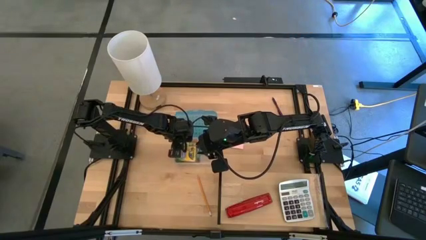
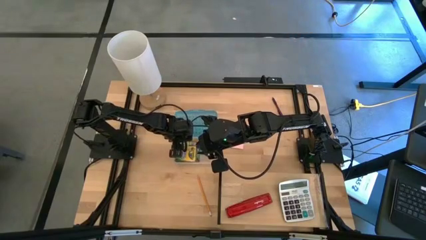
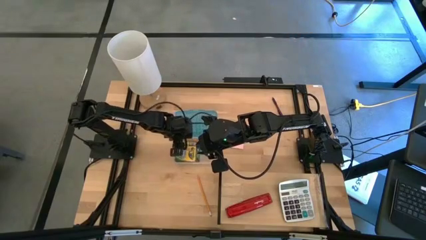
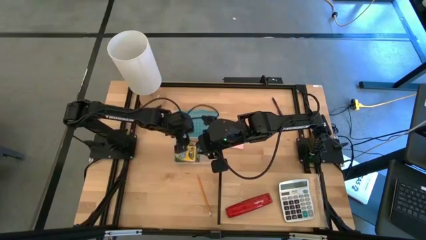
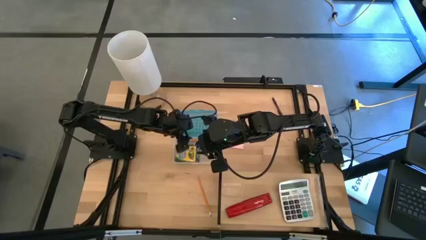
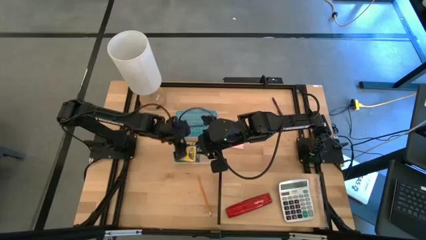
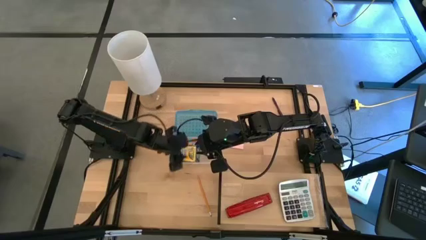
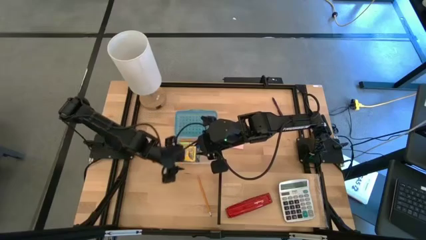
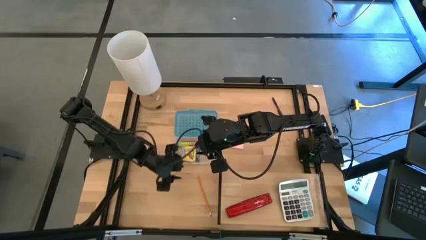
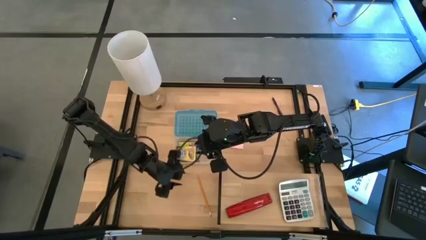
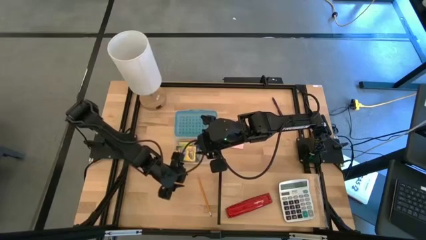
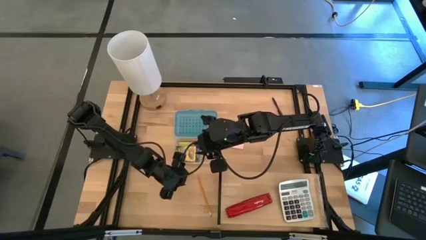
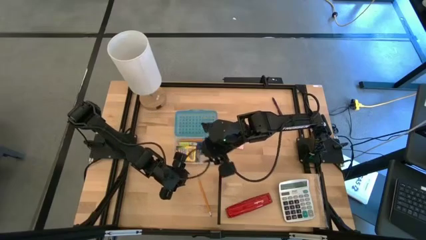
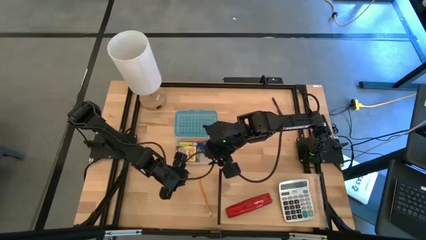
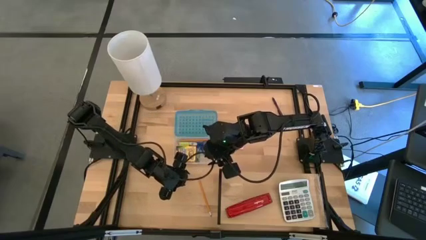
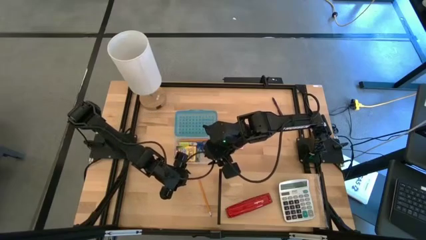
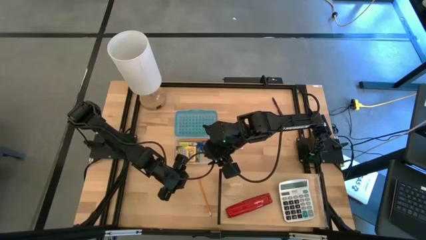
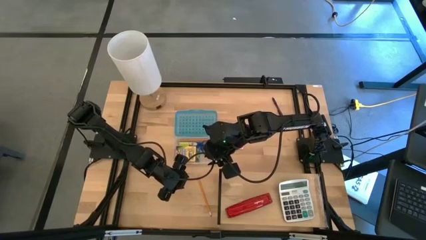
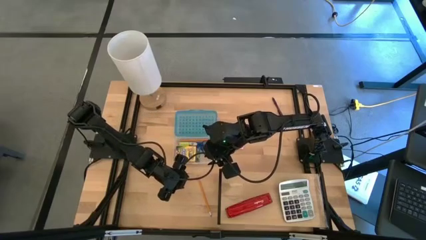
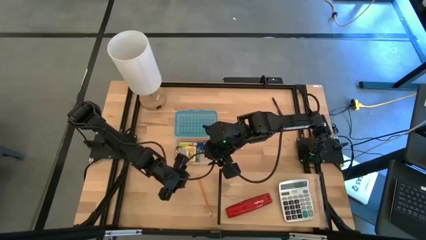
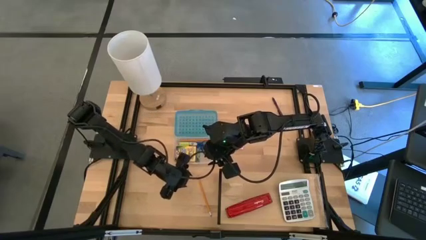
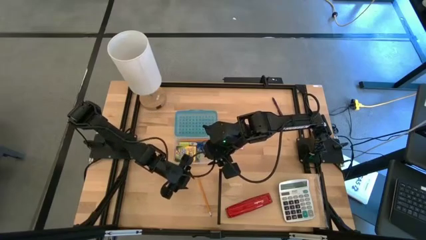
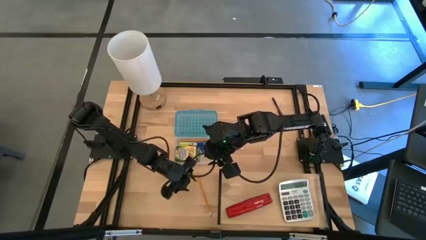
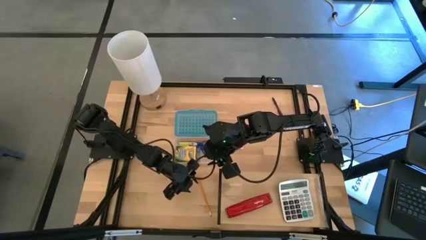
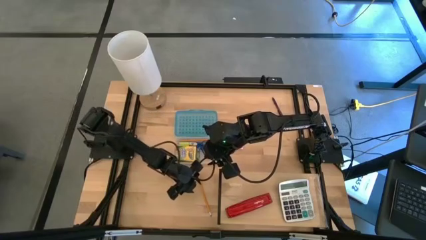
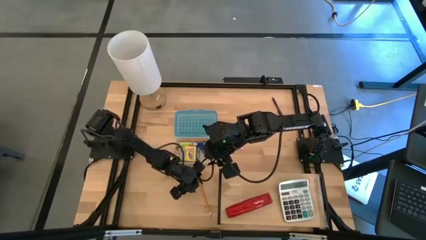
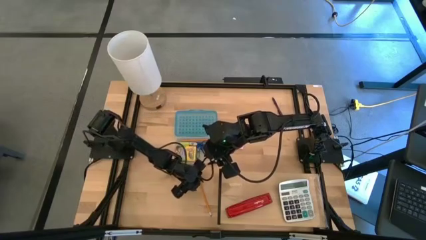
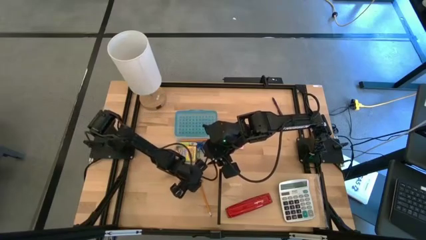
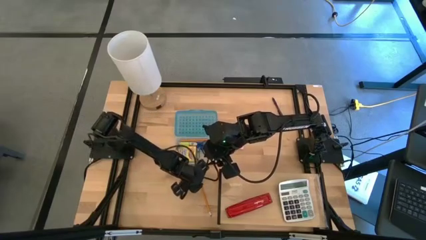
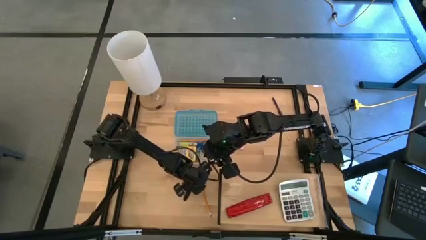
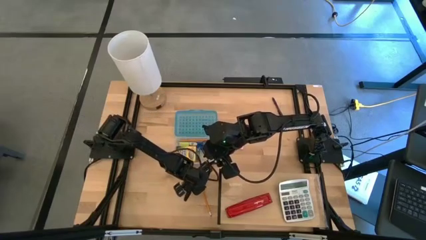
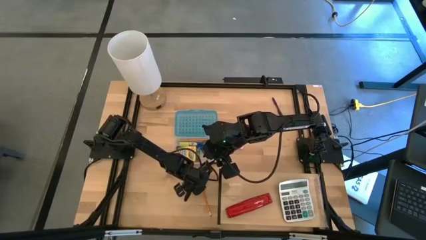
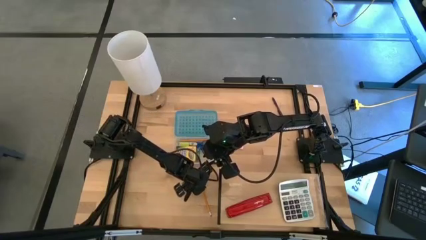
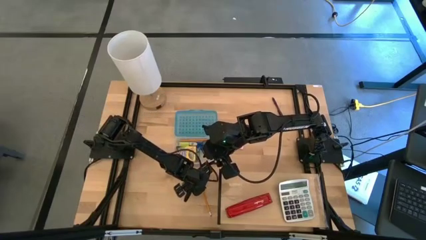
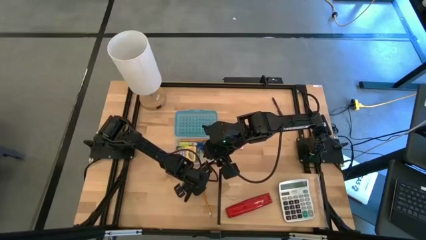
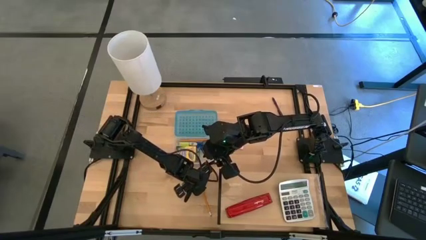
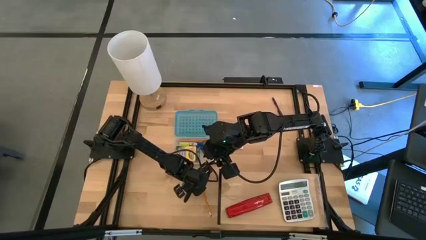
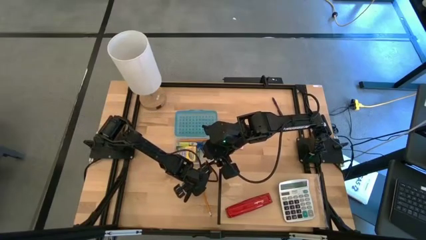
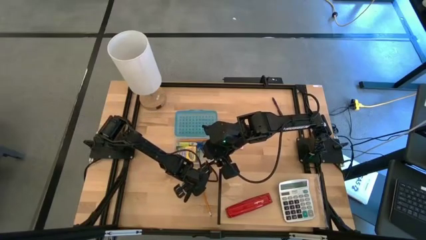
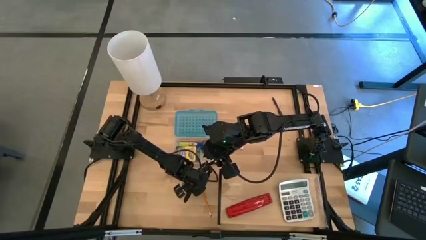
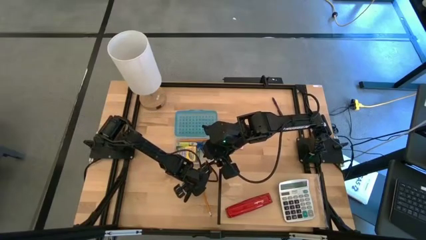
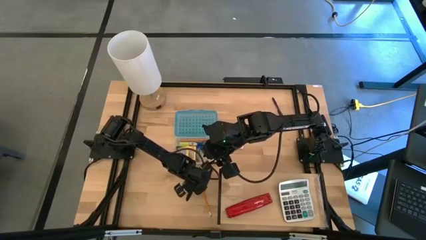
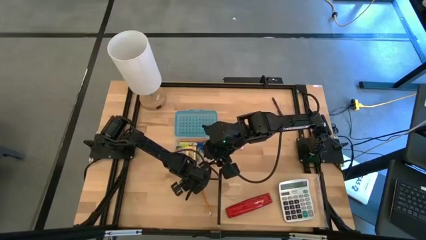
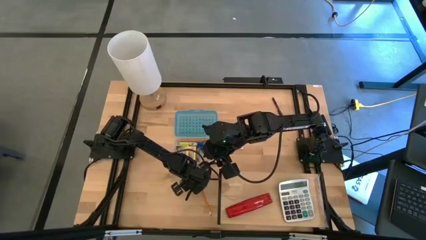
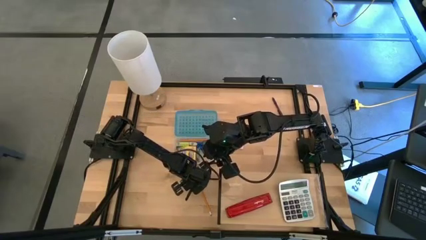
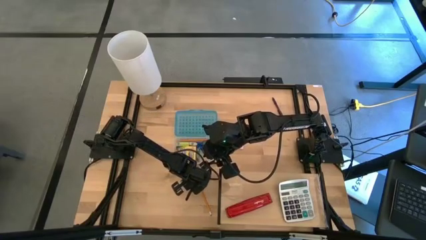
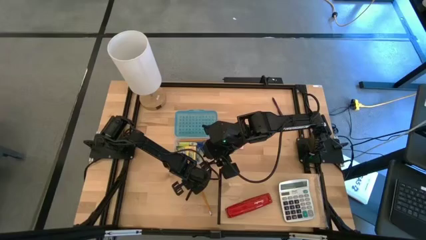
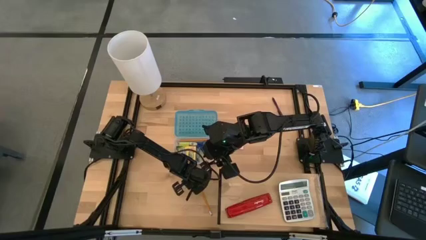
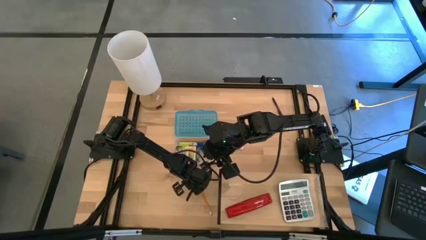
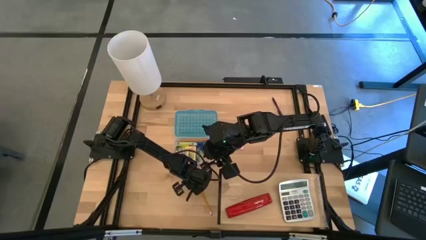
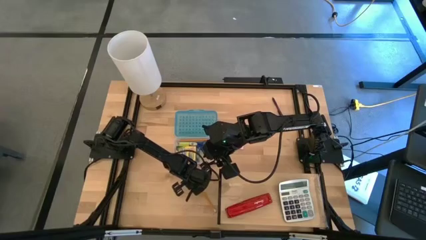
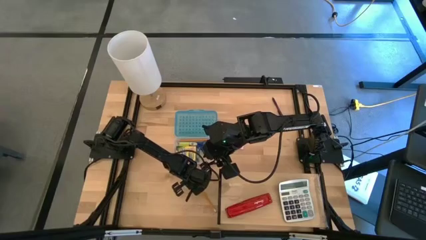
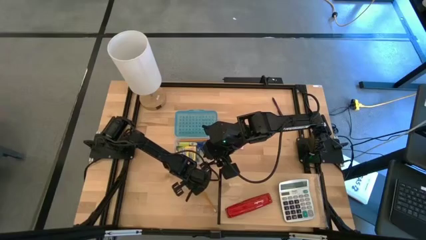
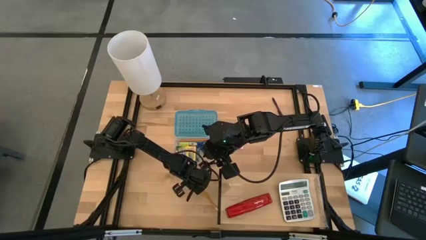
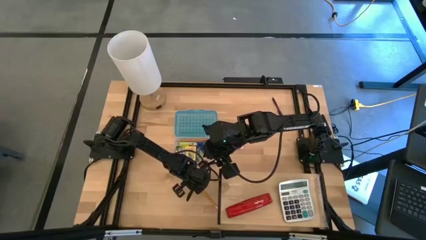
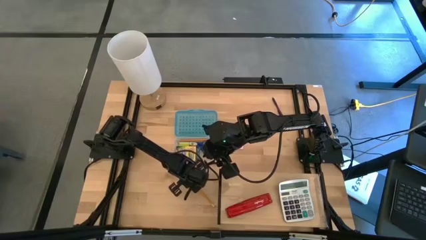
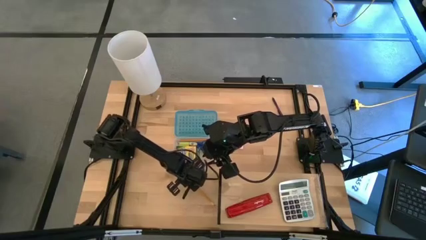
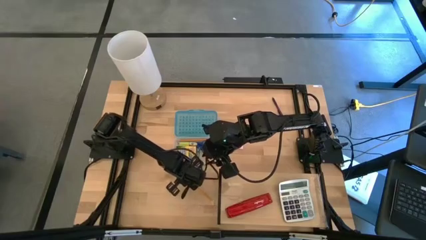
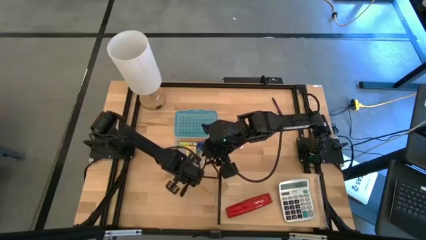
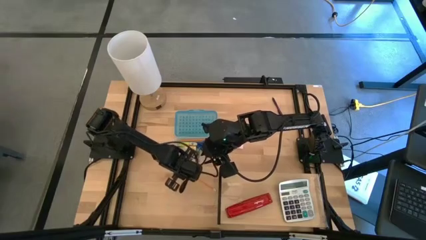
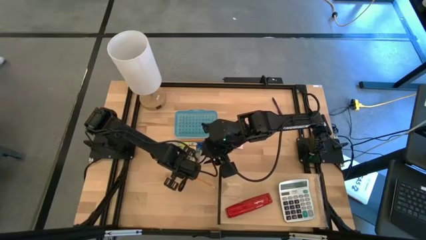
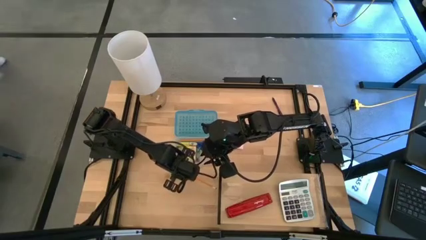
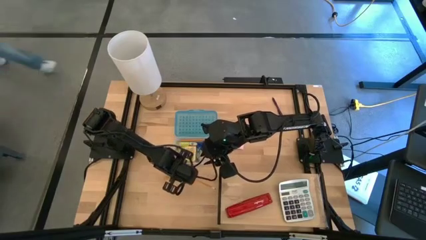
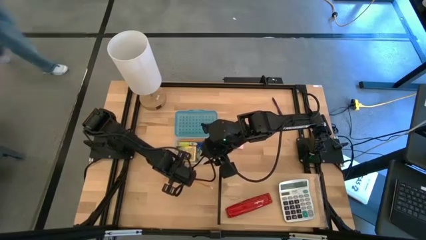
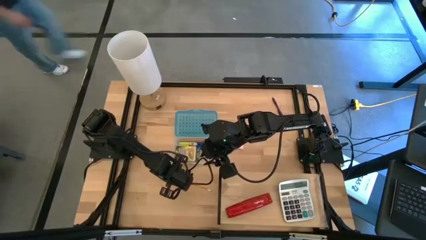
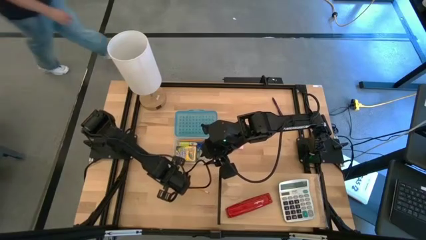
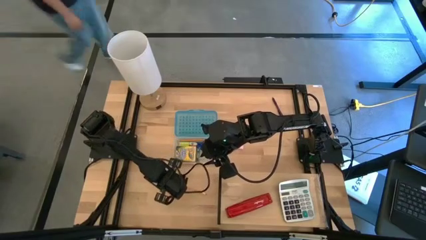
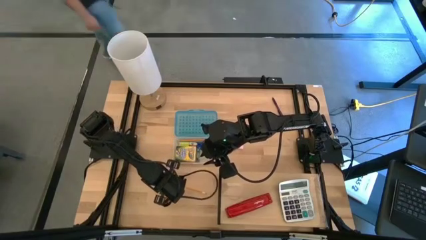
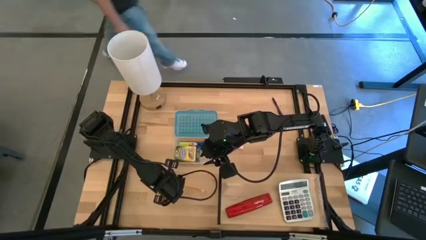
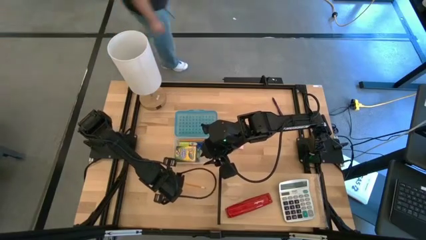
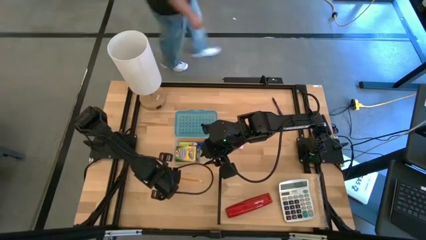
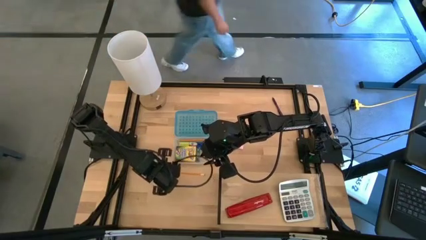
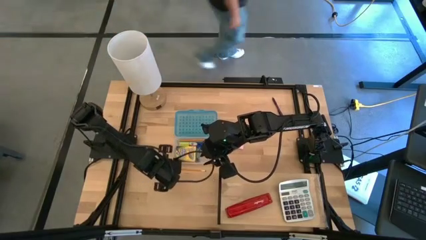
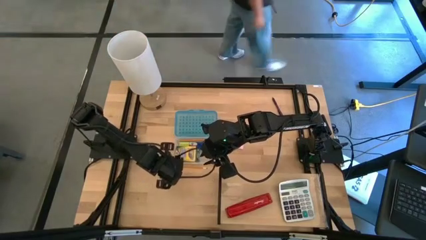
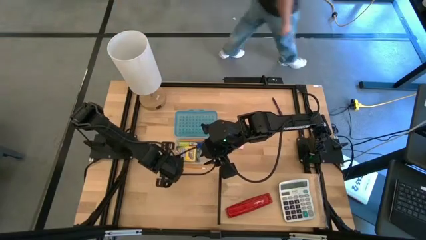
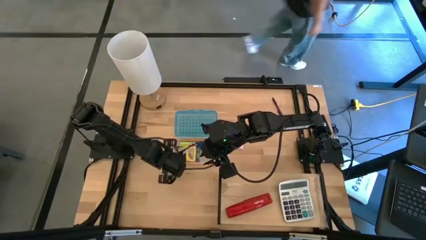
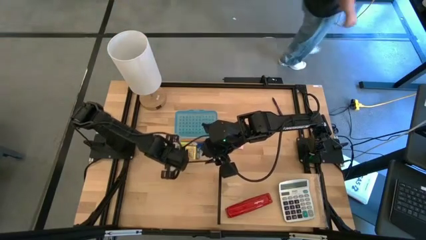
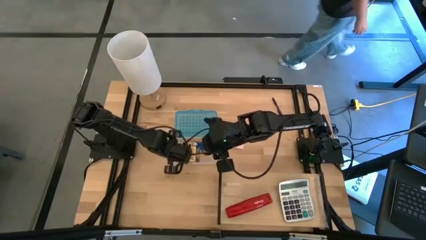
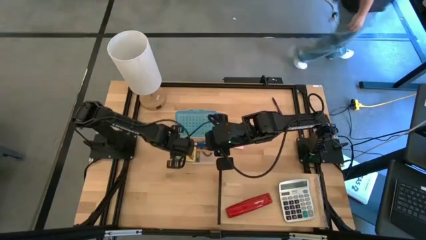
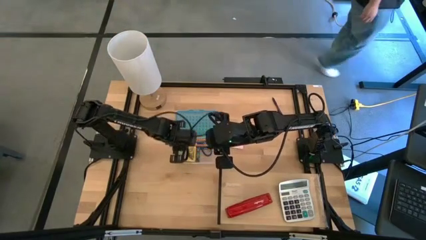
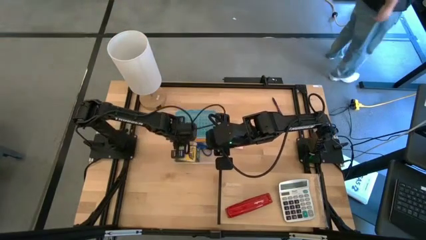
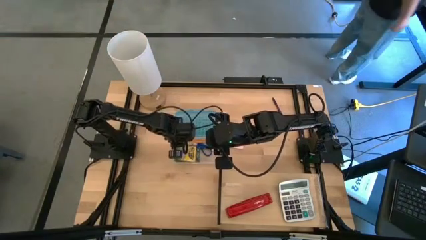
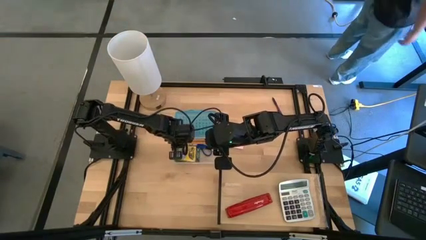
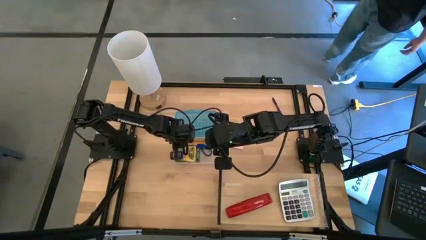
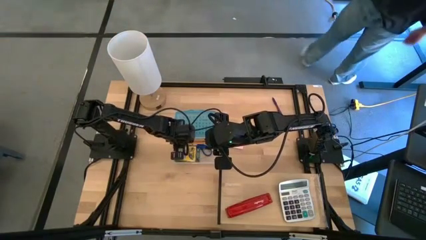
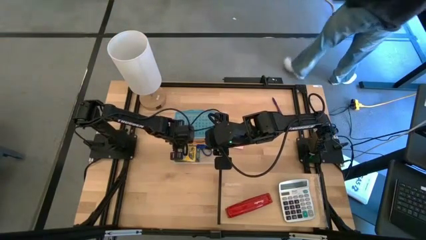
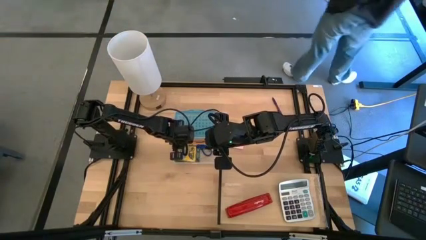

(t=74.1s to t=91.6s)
Task: Pack school essentials
Put the orange pencil into the blue supply box
